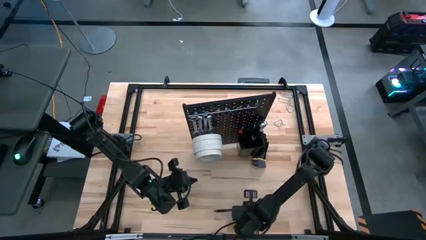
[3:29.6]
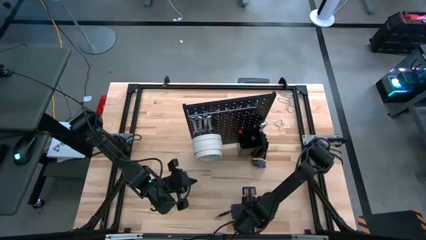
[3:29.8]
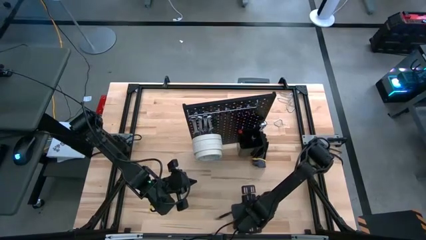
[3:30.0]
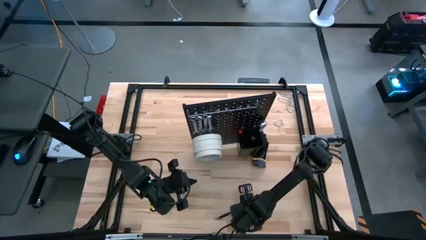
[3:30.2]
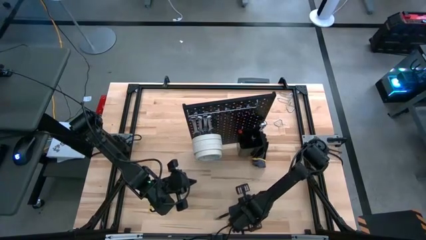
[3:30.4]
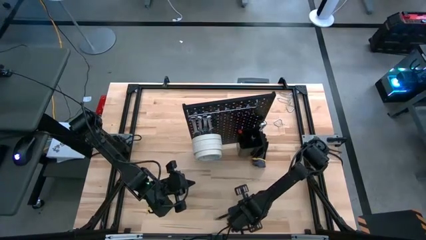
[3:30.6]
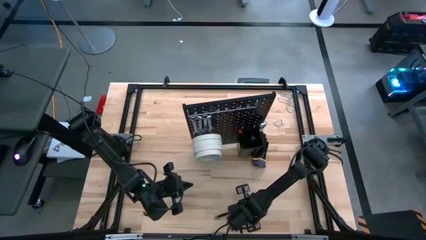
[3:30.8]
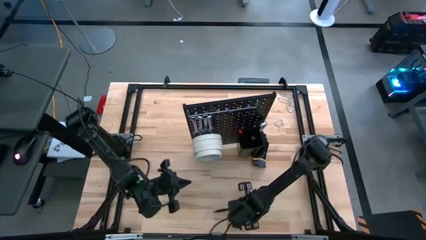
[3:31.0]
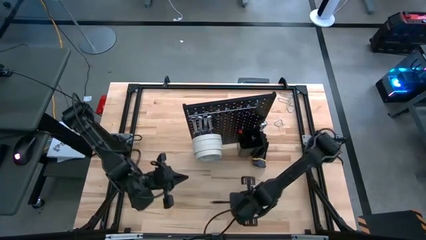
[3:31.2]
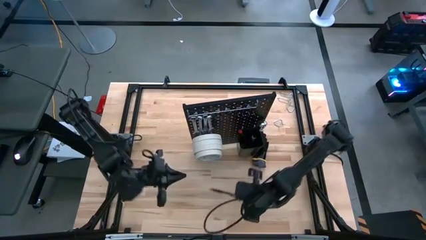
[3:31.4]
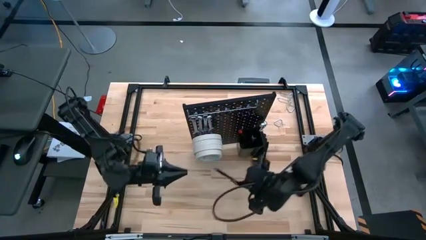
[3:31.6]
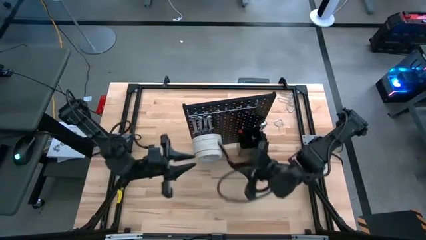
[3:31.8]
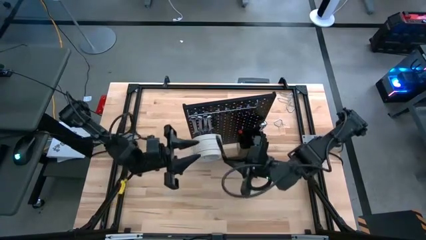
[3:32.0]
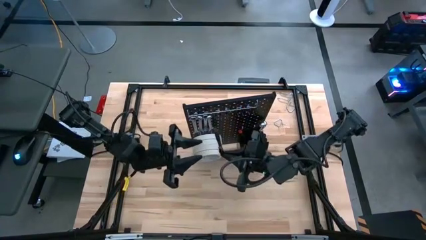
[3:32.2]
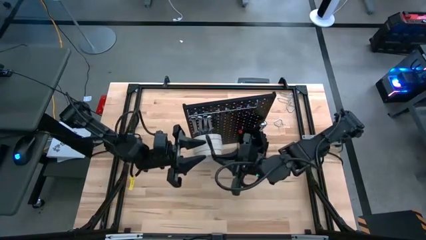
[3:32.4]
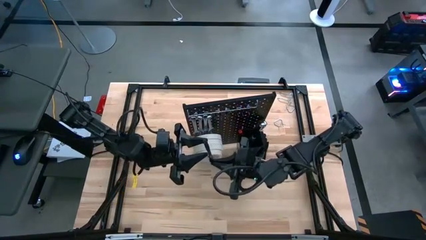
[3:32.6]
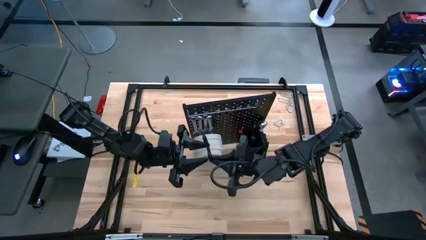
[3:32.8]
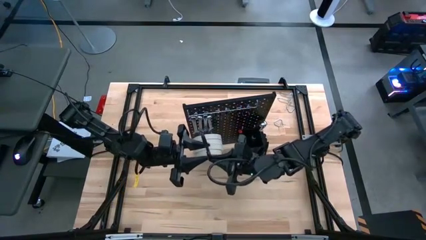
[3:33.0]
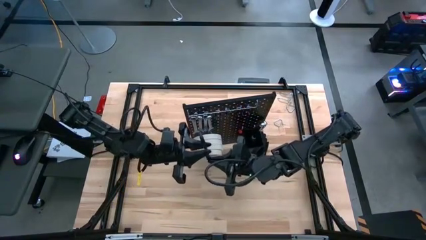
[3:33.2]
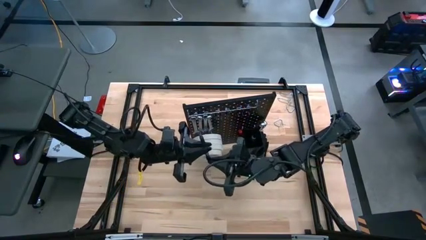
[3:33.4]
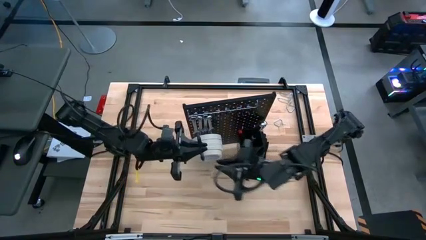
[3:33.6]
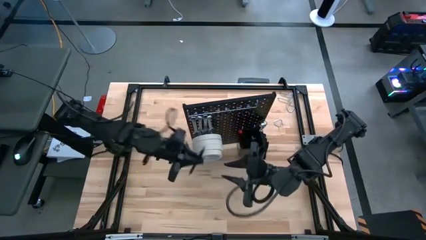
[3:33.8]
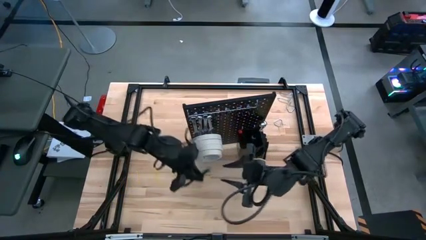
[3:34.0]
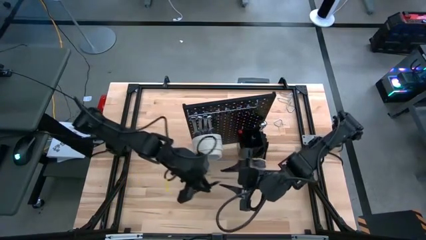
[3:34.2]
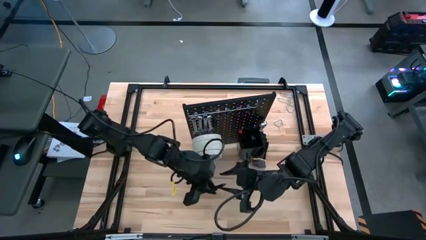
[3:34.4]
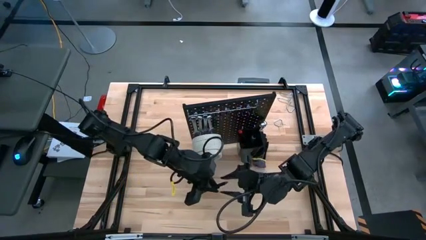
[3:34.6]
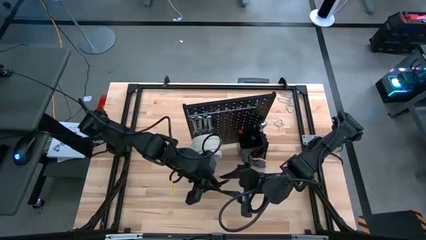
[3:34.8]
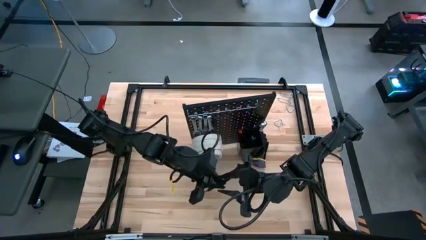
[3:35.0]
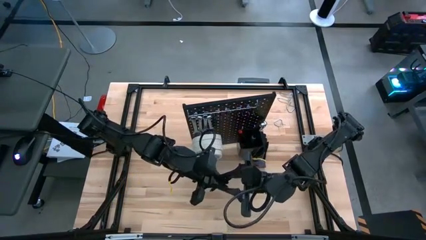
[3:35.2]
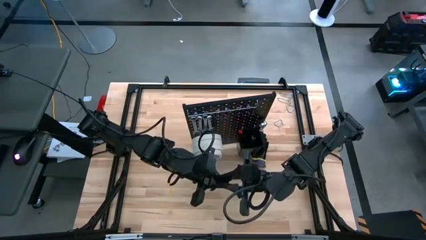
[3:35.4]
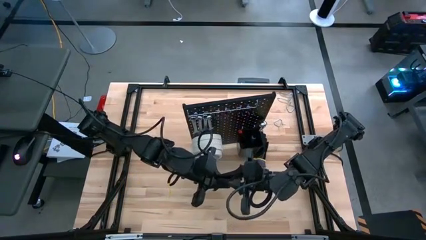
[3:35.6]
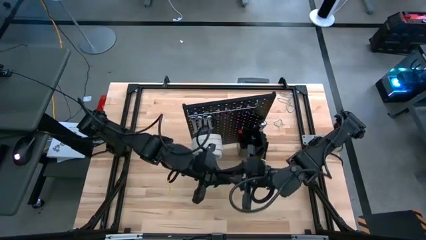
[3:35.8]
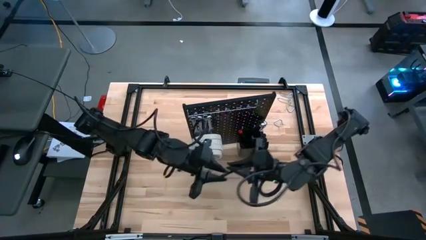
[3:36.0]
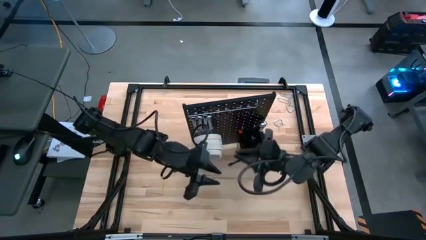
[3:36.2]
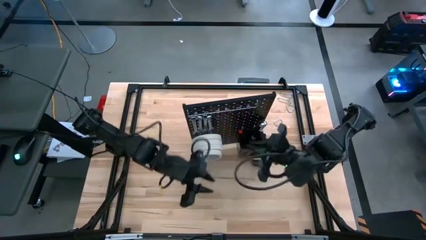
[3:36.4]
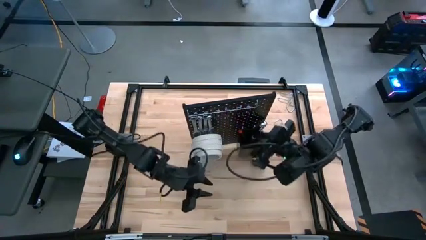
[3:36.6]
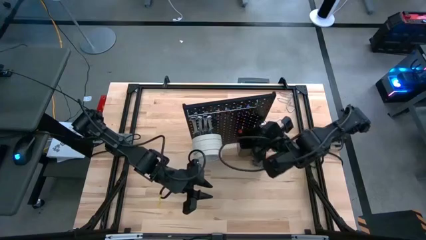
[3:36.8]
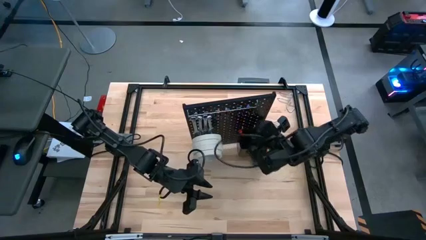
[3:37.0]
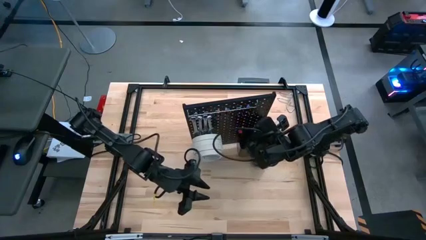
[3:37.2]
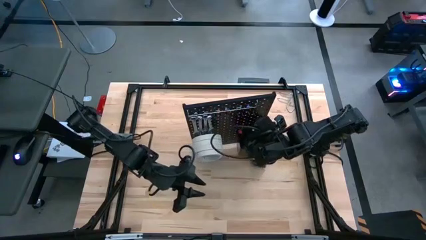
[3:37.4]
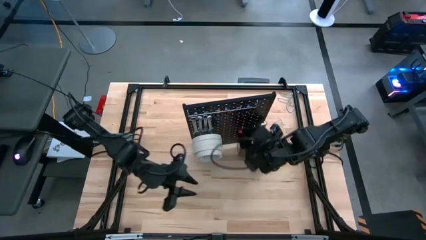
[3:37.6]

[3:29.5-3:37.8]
Task: Hang tools onto peg board
Hang the black ballpoint pen onto the pegboard

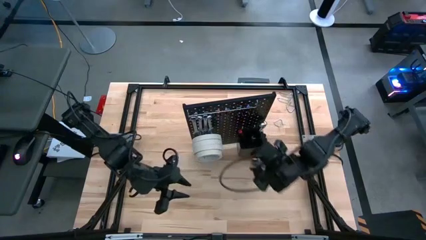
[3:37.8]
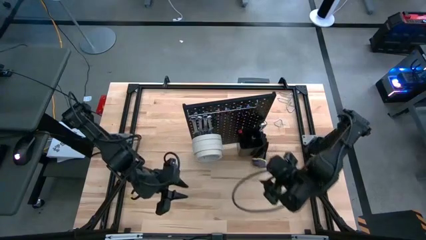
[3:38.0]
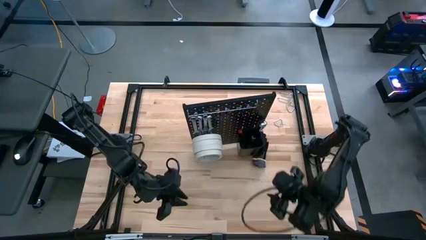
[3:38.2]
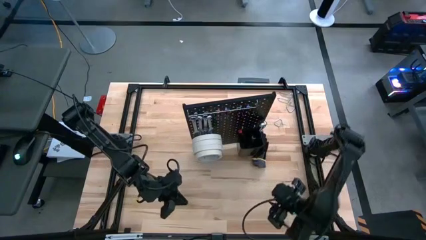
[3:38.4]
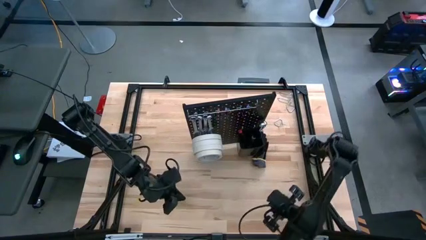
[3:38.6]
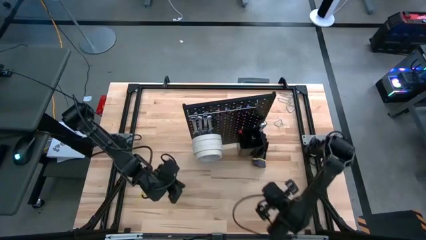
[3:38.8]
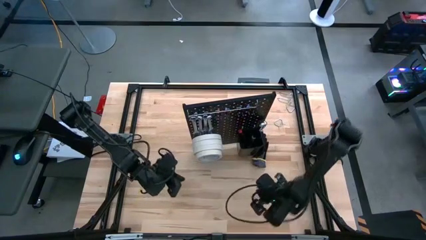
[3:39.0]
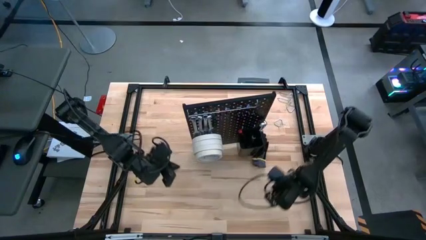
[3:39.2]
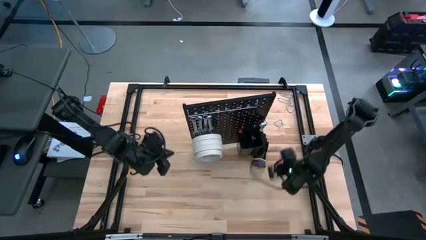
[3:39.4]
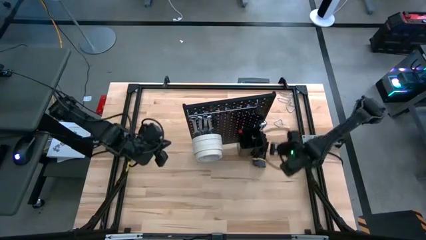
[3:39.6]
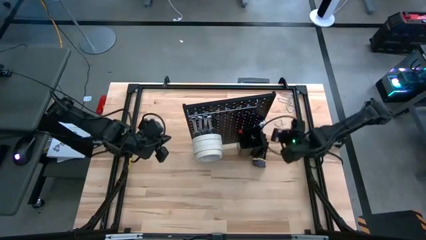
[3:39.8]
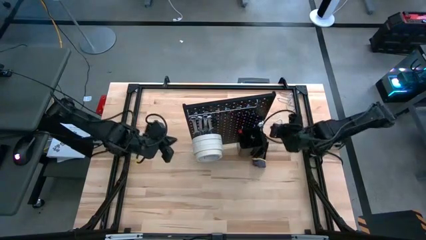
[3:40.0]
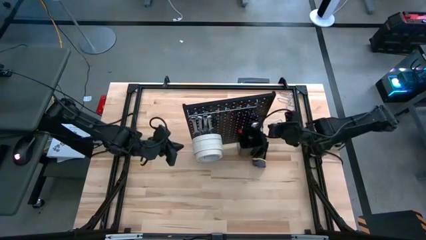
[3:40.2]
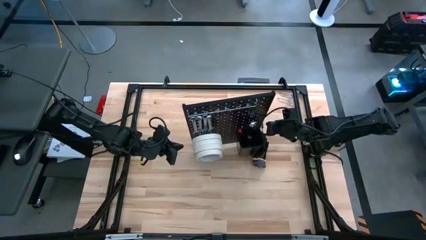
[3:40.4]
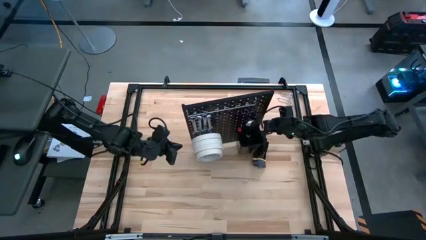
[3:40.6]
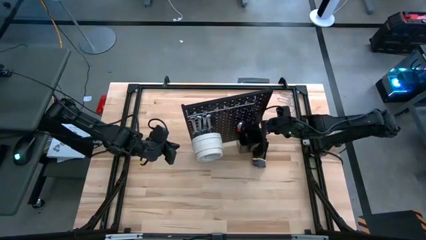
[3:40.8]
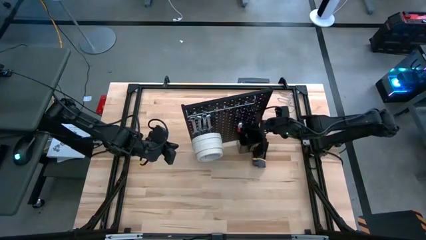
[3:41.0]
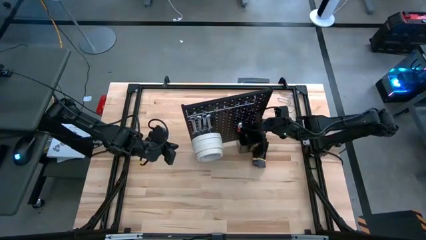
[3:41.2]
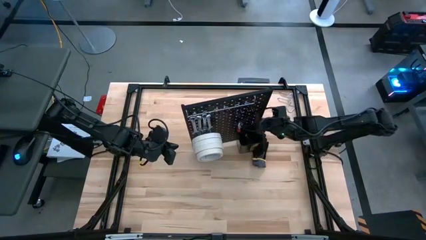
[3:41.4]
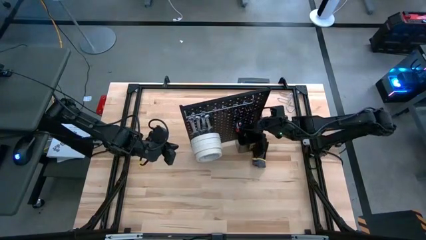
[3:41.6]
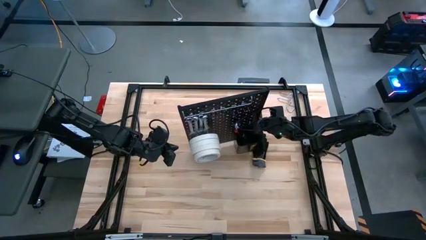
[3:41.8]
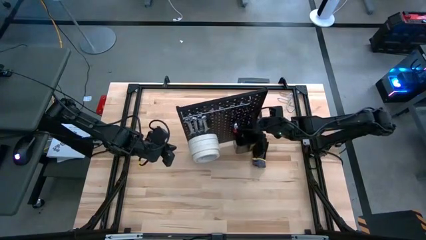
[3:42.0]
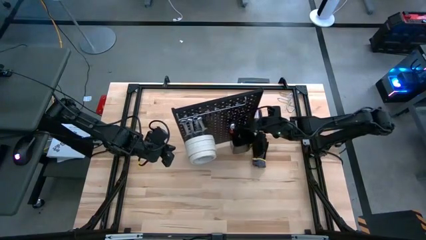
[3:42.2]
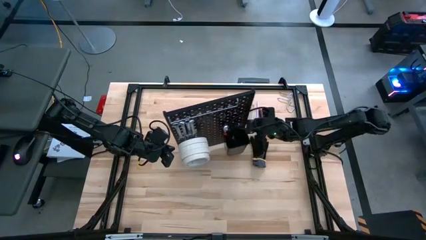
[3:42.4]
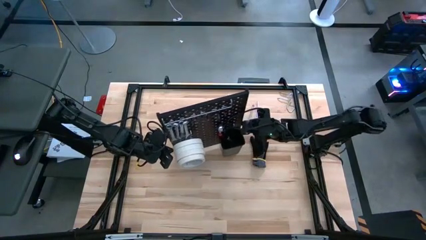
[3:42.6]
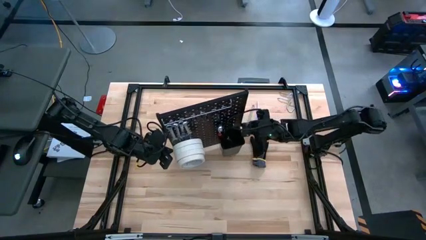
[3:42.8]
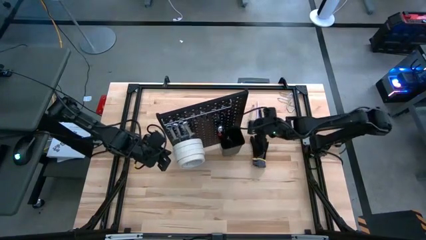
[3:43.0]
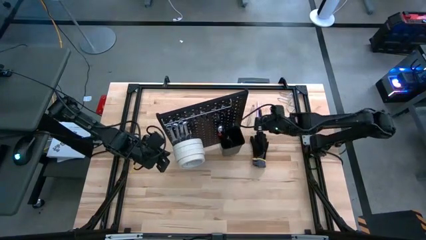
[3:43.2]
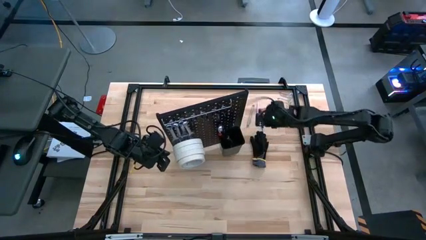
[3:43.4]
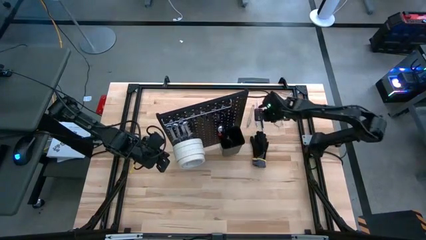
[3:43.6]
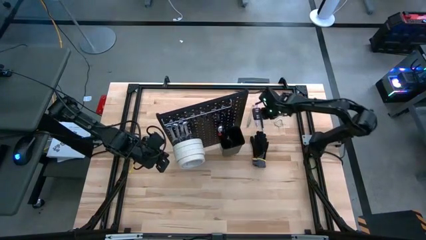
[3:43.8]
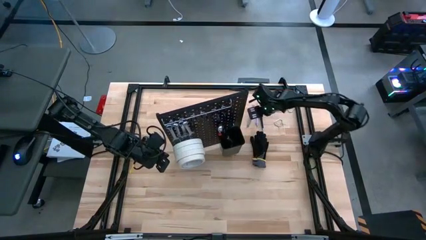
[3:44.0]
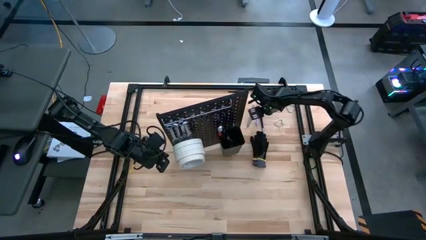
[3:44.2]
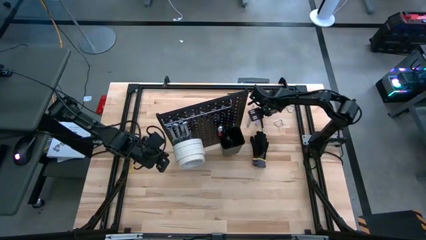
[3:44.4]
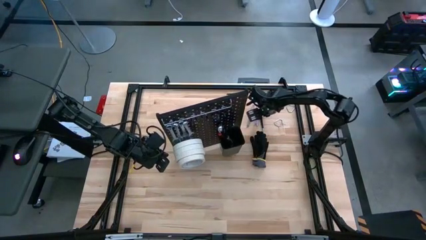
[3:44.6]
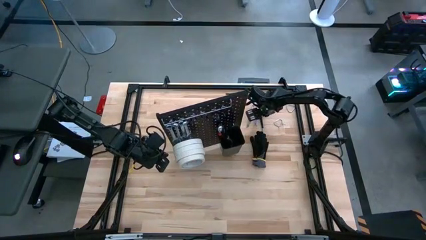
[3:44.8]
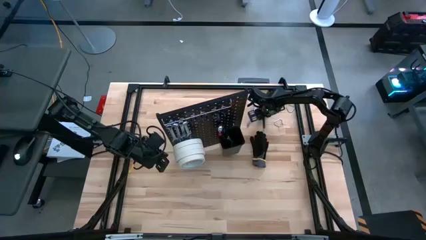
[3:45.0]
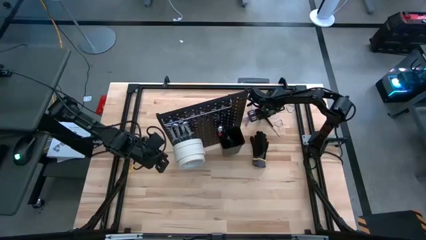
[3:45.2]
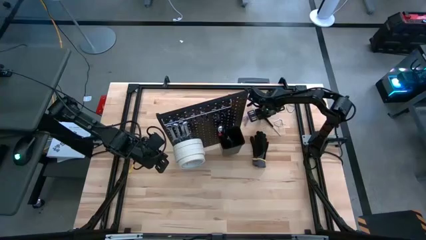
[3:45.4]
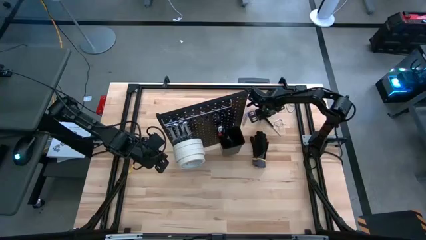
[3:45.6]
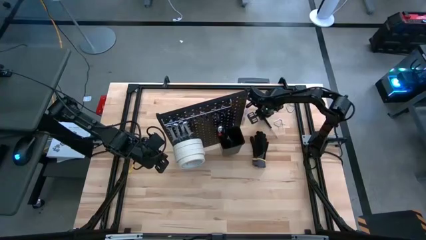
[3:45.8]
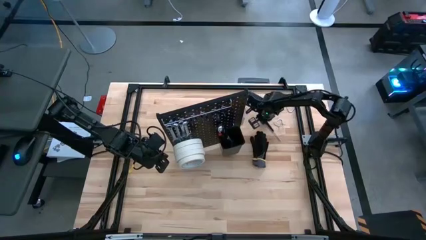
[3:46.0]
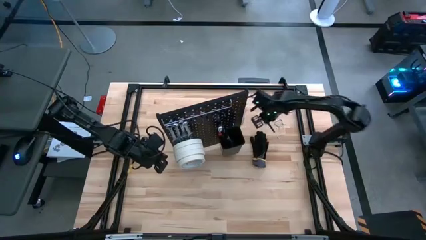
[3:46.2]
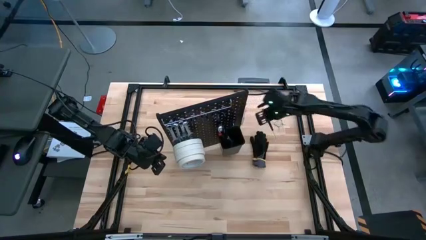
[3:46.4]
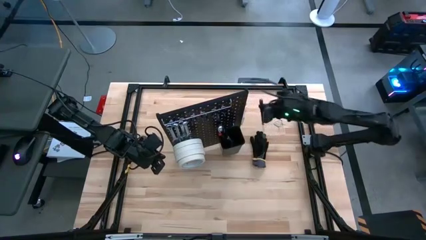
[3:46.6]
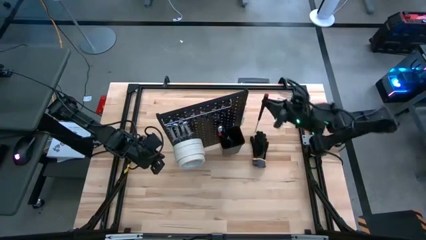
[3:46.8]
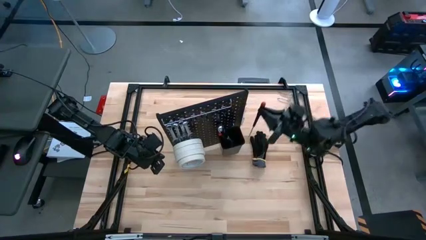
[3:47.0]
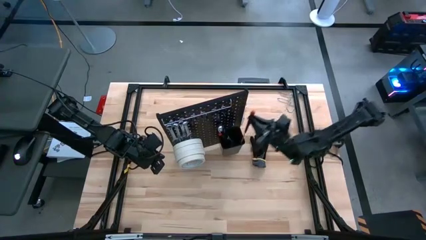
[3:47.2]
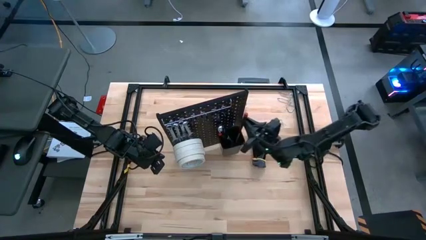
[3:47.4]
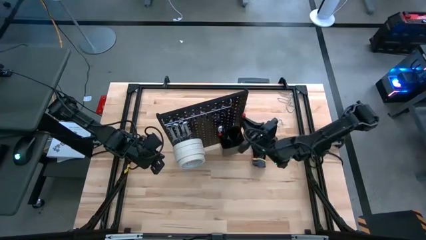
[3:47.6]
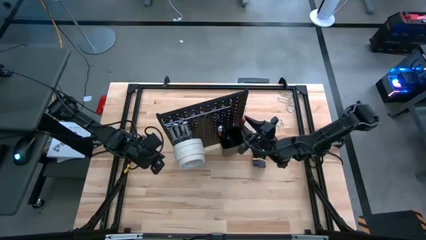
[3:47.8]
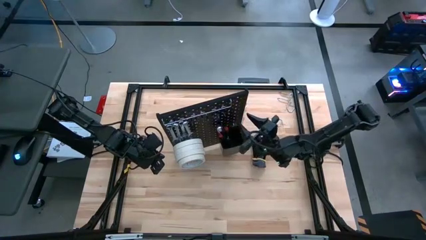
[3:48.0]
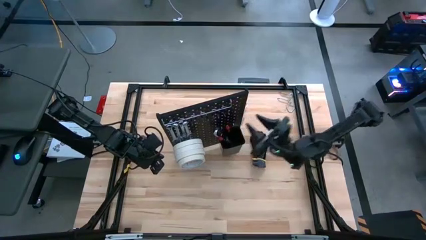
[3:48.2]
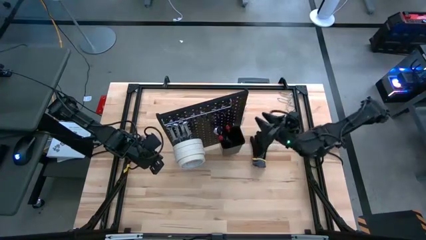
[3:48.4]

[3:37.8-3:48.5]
Hang the screw tool onto the pegboard
